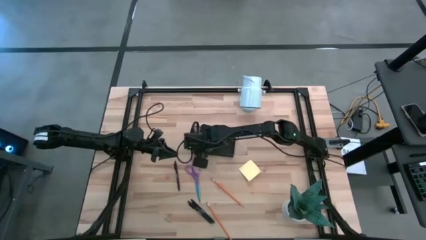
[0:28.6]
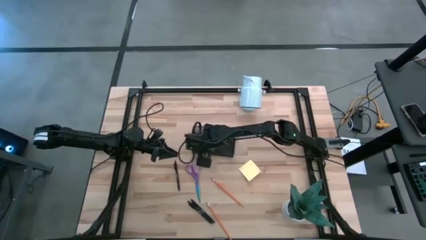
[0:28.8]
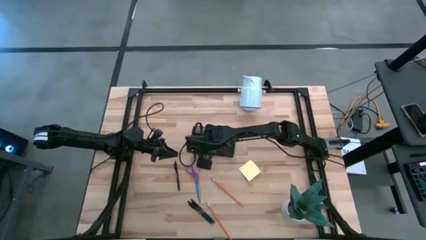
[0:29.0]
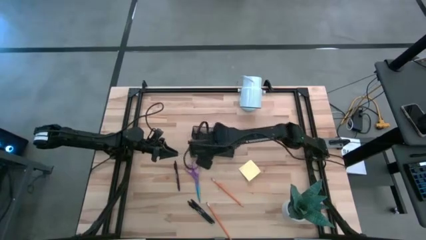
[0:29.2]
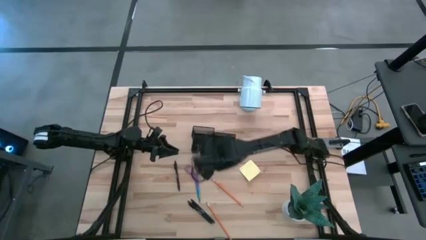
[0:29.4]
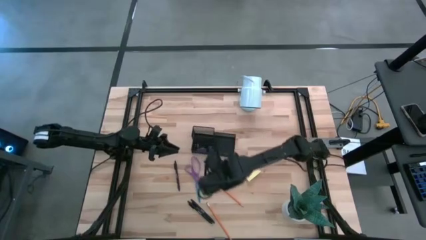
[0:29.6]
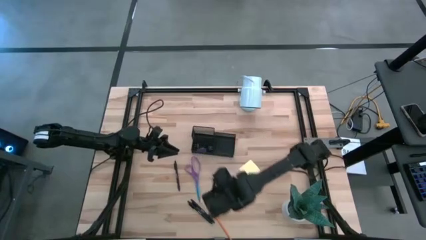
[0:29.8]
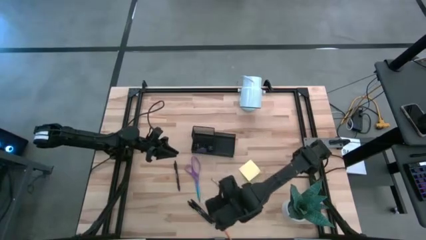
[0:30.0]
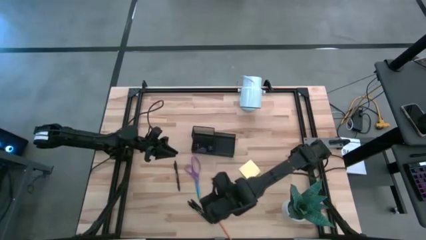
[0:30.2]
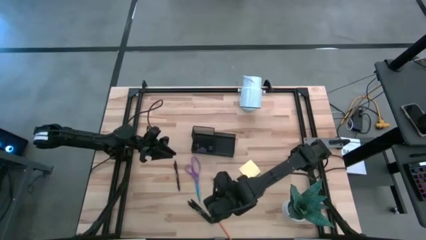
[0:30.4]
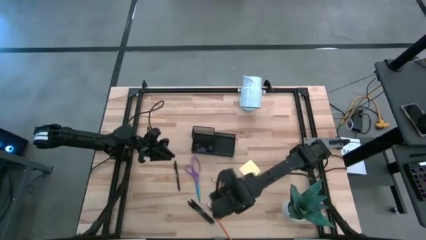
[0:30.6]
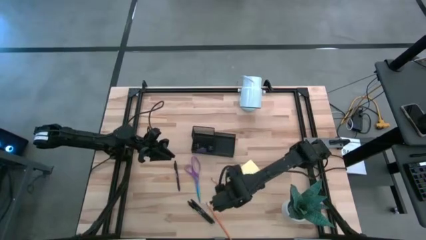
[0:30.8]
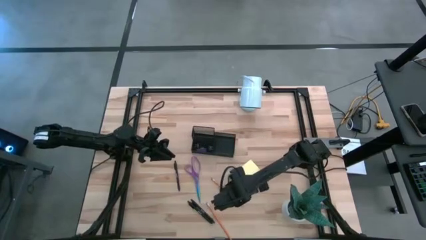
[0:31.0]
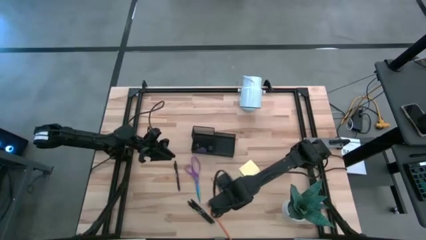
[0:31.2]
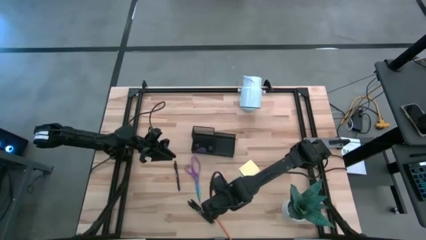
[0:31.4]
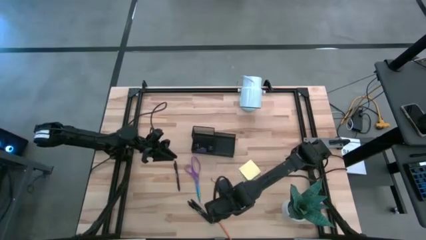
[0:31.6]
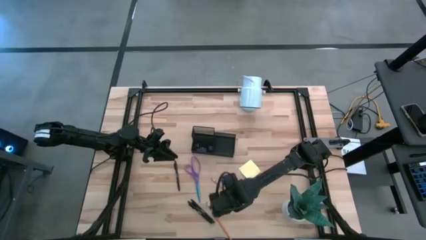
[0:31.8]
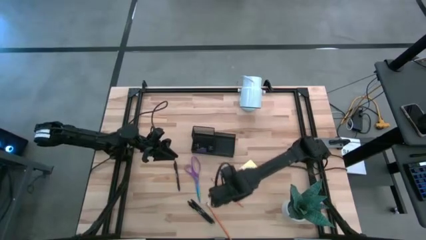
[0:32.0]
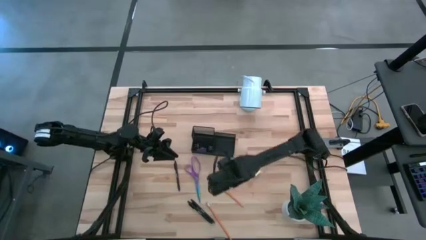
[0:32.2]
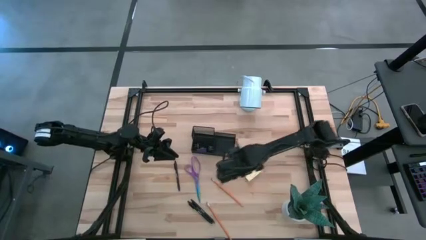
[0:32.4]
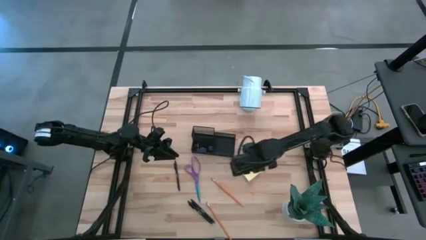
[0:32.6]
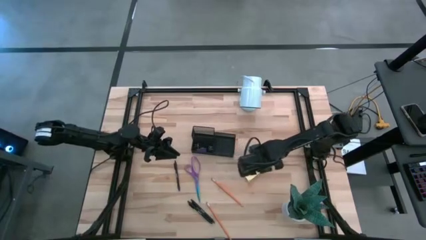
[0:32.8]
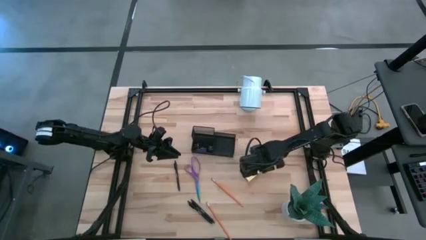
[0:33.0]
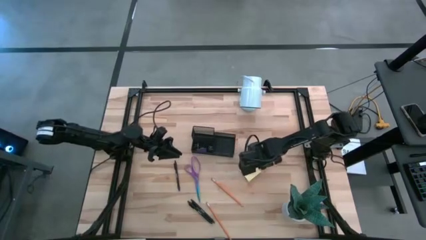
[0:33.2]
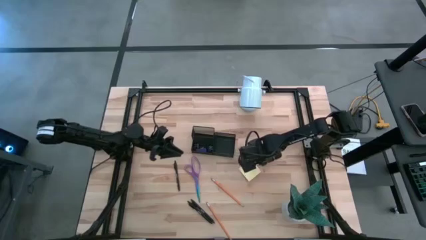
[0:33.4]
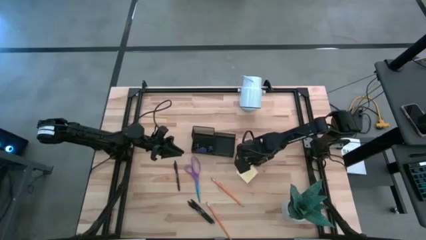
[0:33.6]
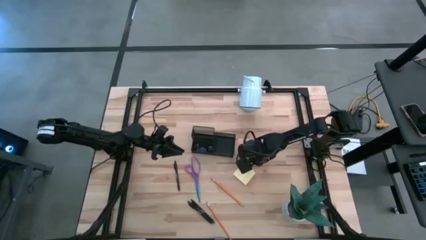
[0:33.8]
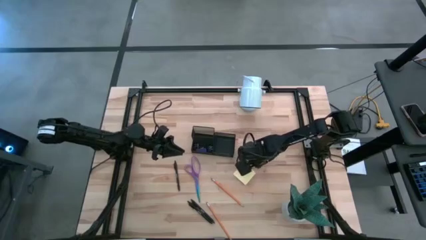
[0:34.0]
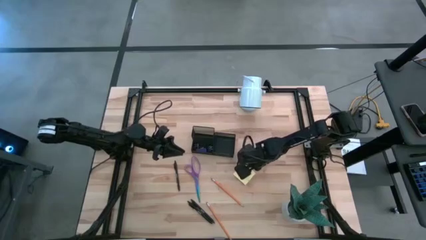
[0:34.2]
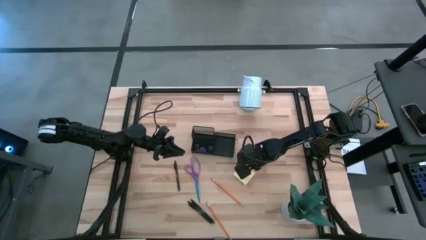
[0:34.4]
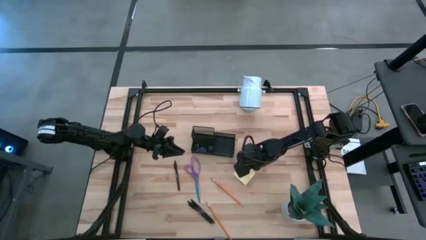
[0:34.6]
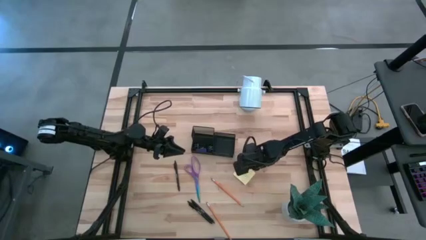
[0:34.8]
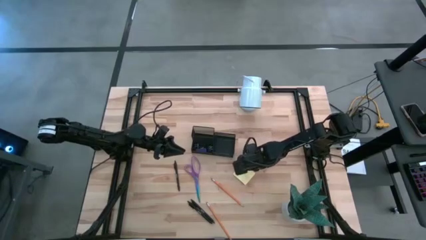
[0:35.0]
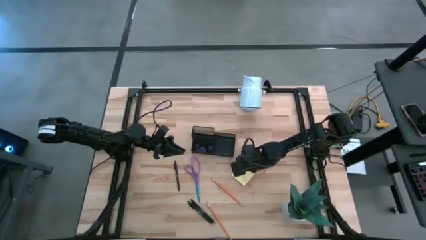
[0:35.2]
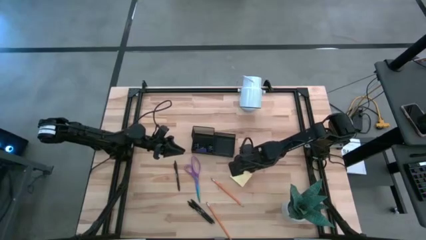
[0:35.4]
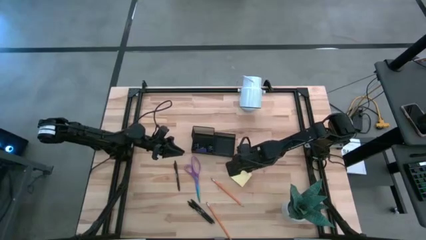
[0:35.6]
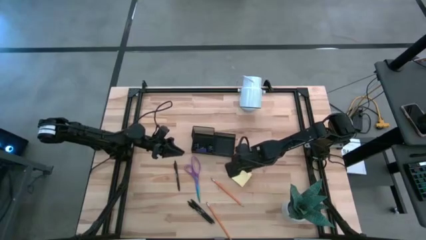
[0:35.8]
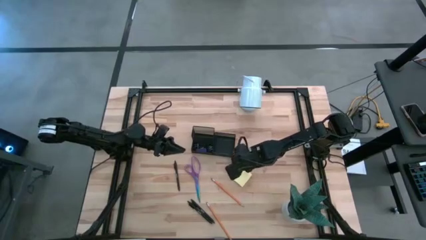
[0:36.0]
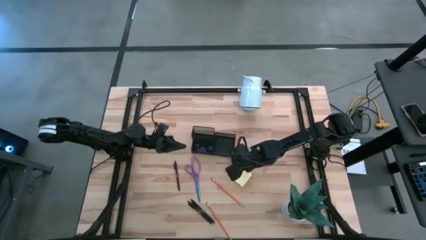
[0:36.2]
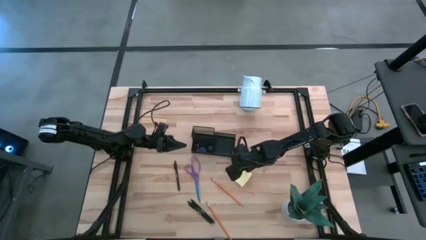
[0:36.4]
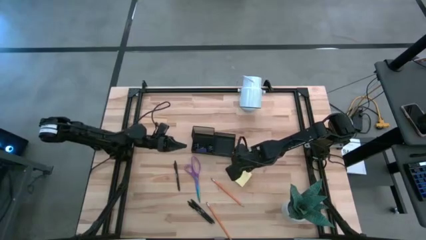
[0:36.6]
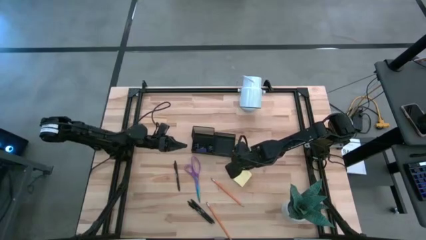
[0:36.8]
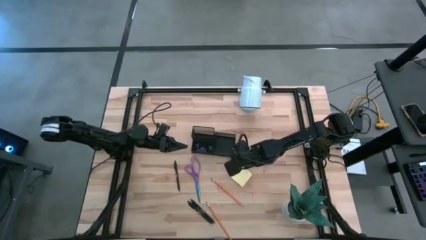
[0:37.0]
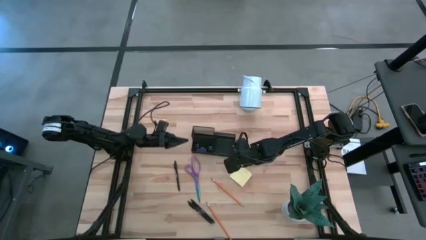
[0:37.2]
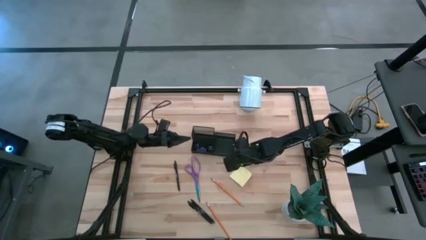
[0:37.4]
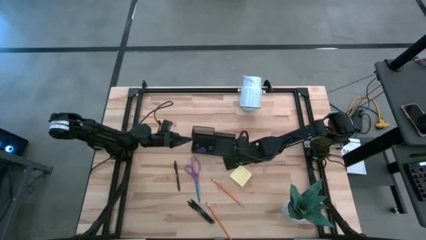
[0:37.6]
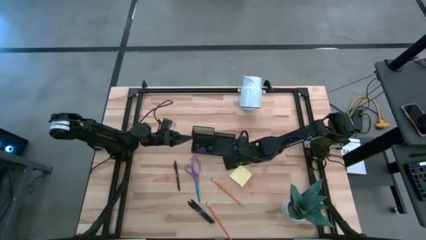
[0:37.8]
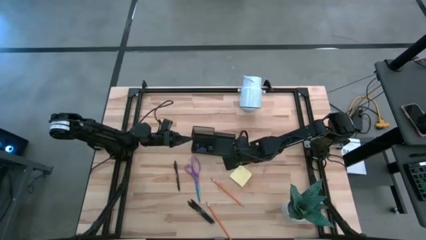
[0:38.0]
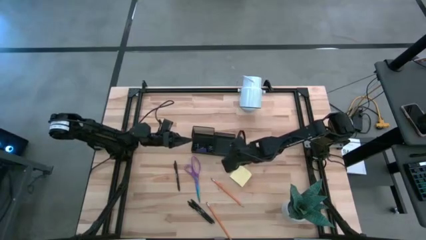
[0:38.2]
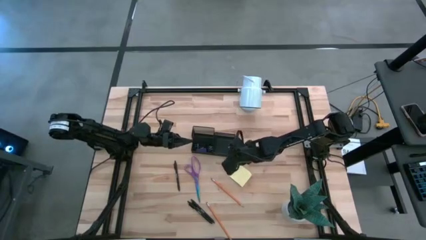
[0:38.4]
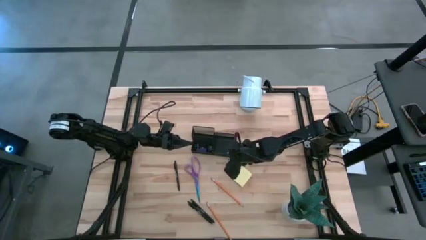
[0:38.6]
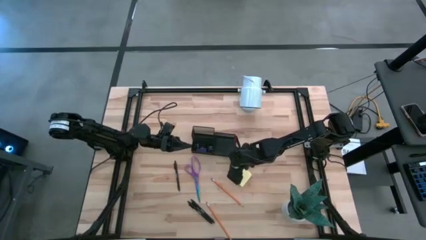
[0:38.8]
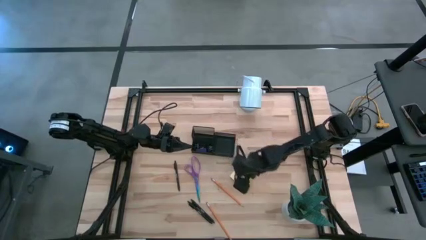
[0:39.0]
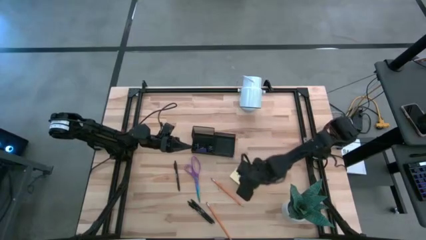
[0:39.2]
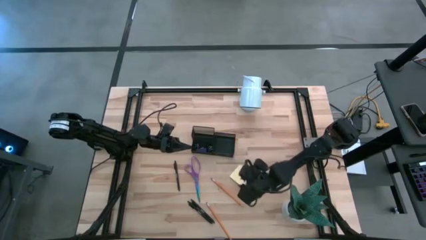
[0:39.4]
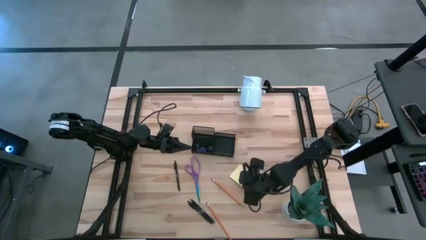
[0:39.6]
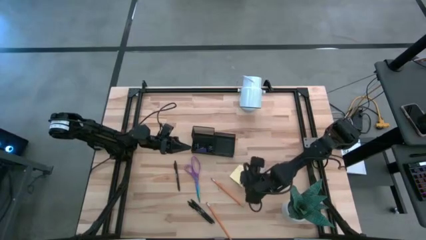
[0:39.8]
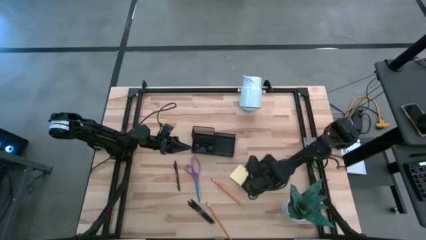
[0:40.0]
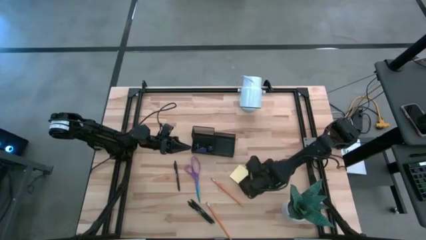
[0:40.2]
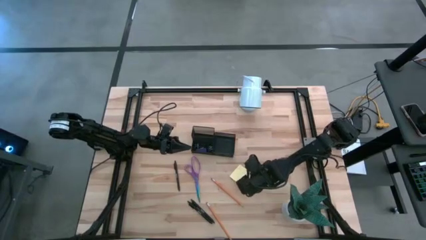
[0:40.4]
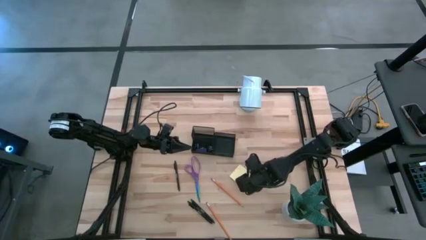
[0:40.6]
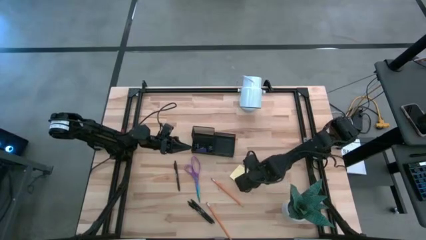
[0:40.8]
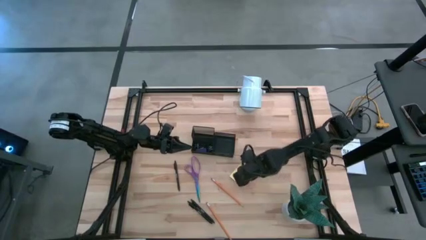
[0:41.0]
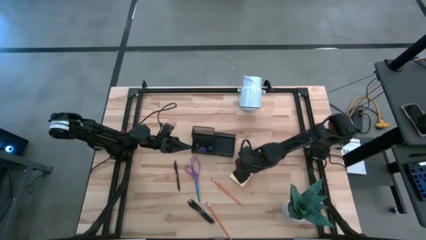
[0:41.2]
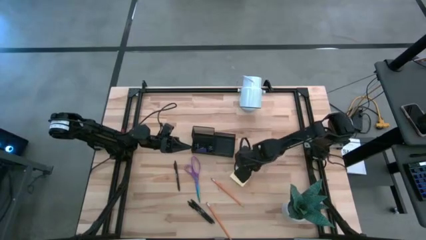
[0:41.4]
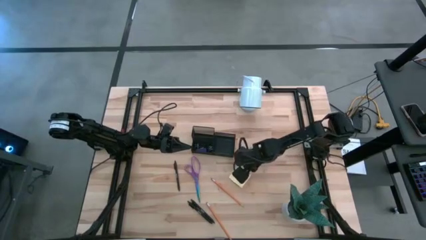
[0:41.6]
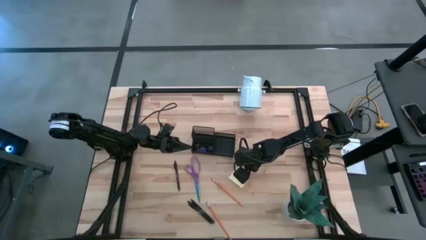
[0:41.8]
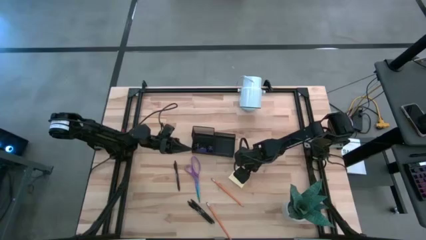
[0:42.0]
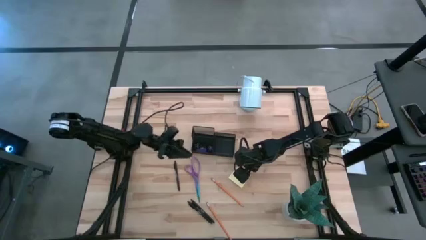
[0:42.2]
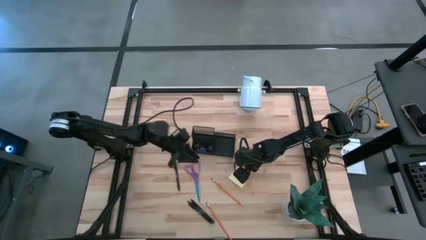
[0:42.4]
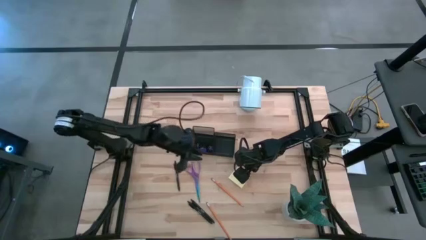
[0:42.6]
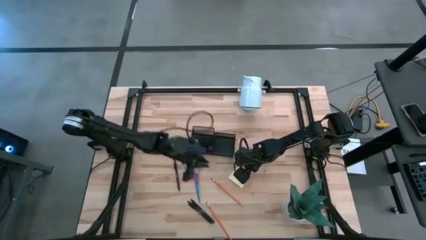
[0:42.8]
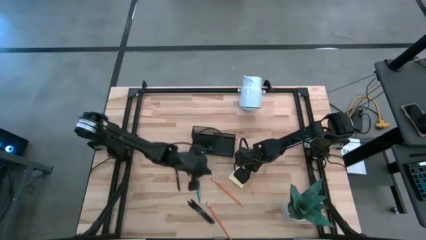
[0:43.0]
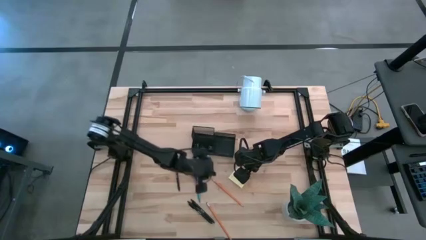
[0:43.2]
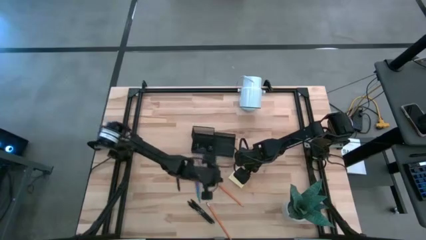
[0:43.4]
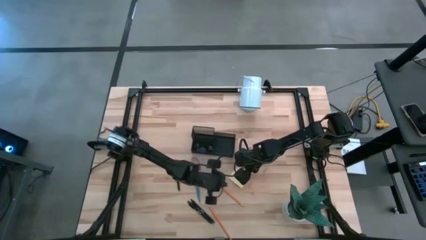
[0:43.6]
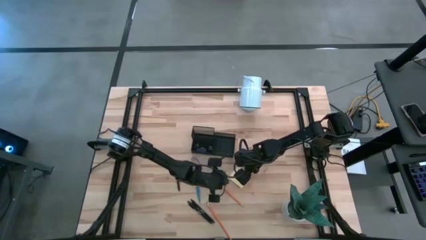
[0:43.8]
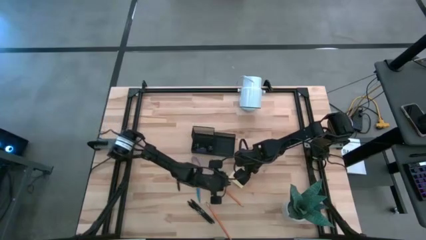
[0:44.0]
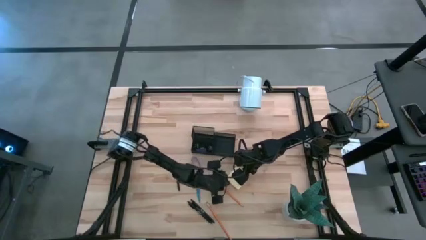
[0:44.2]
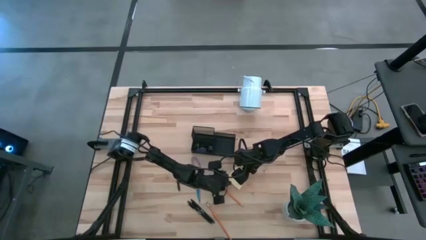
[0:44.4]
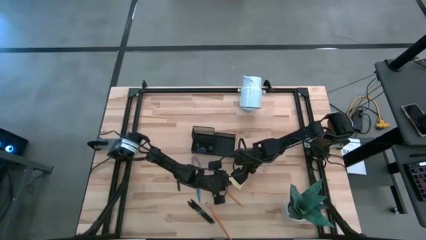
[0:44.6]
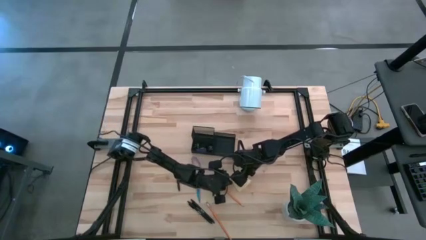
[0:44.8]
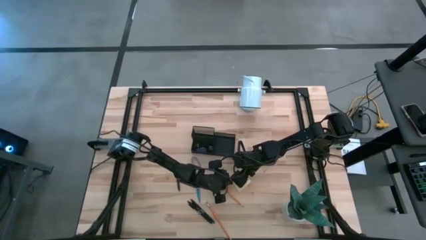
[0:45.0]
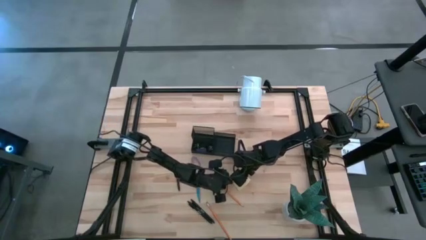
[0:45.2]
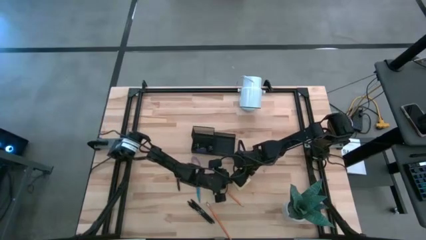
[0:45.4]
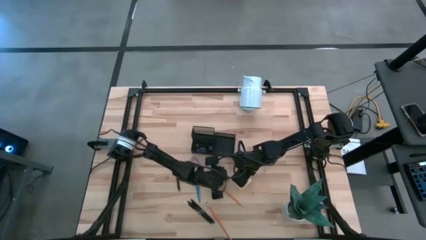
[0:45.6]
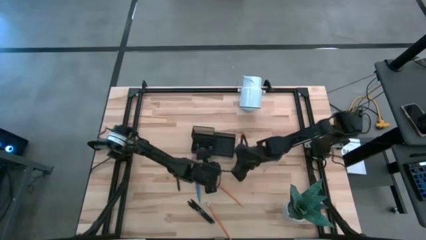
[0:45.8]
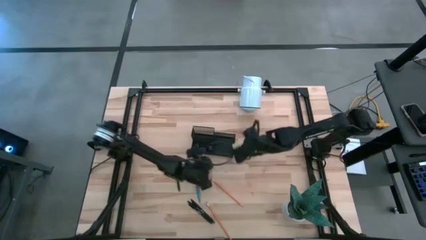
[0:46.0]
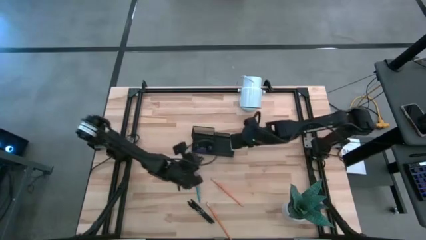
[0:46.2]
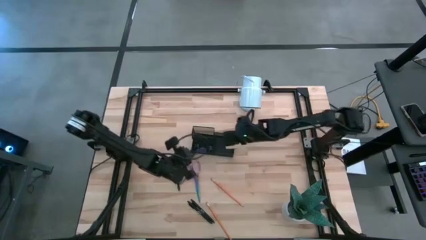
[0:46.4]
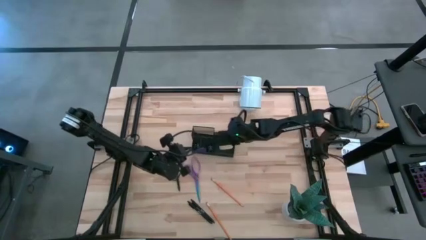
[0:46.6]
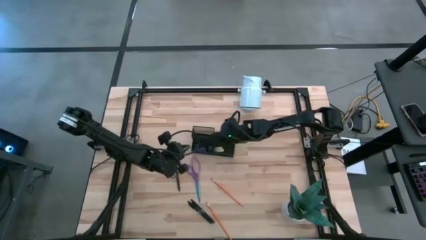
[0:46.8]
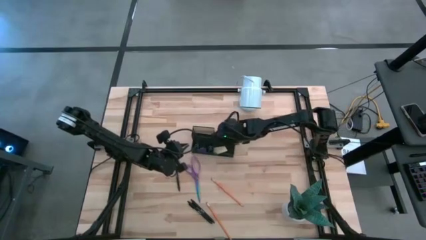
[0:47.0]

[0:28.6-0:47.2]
Task: Pick and place office supplies into organizer
Put the yellow sticky notes into the black desk organizer
